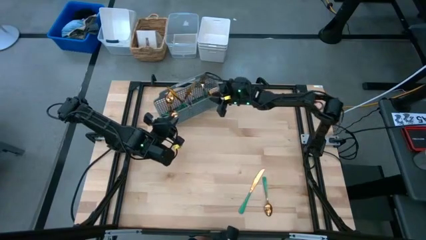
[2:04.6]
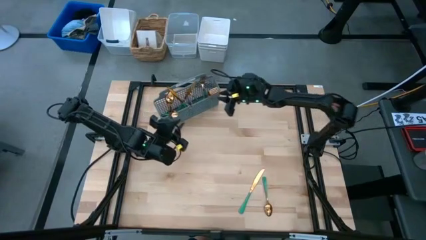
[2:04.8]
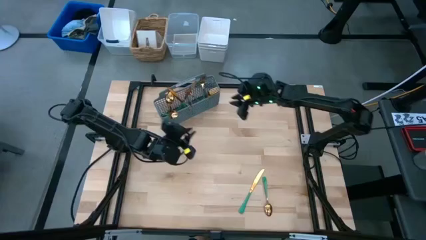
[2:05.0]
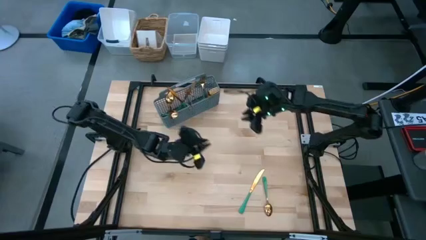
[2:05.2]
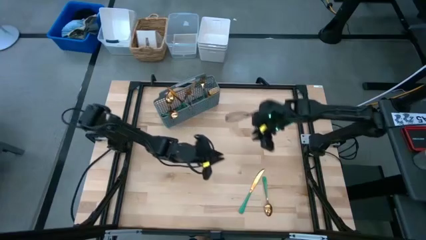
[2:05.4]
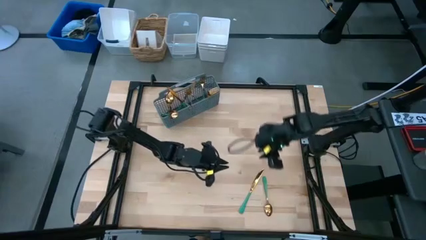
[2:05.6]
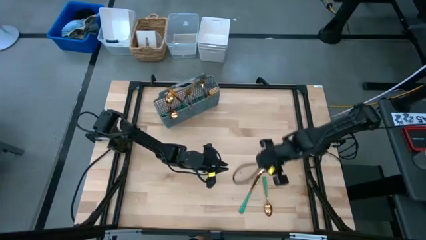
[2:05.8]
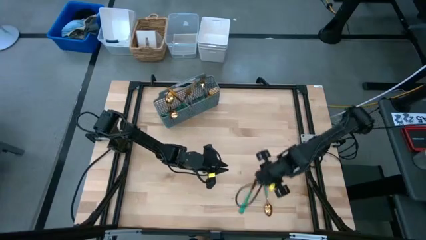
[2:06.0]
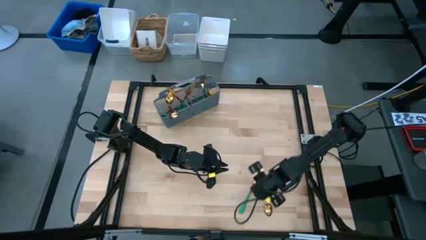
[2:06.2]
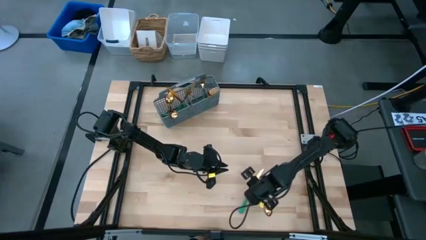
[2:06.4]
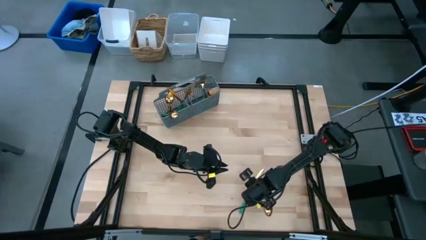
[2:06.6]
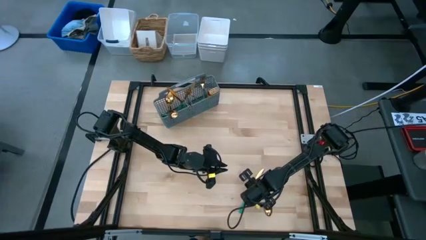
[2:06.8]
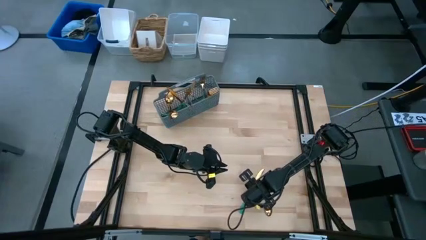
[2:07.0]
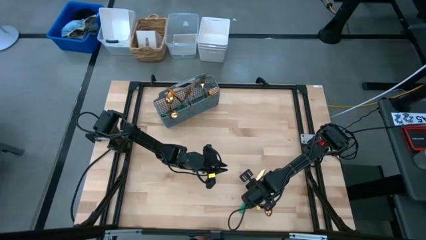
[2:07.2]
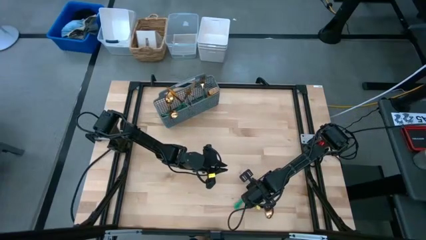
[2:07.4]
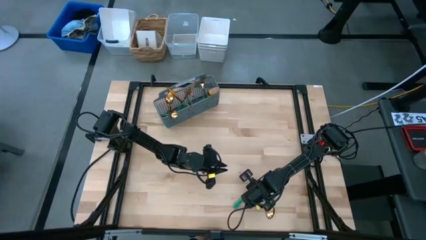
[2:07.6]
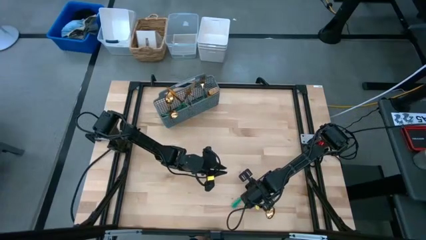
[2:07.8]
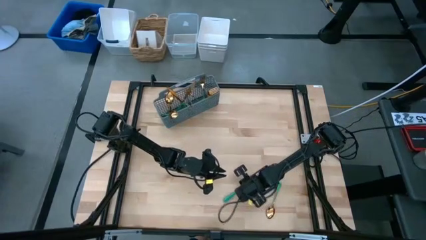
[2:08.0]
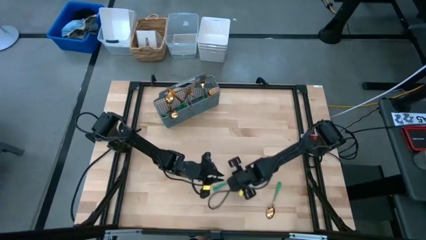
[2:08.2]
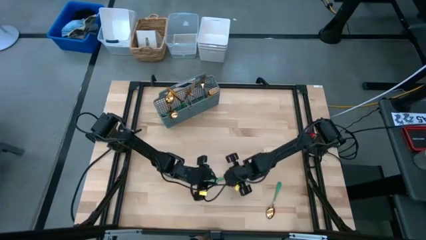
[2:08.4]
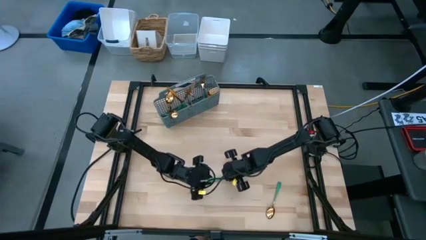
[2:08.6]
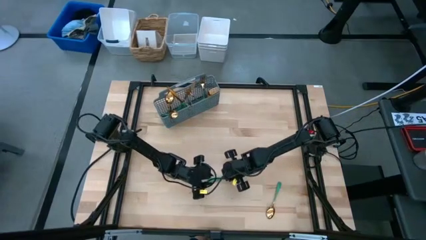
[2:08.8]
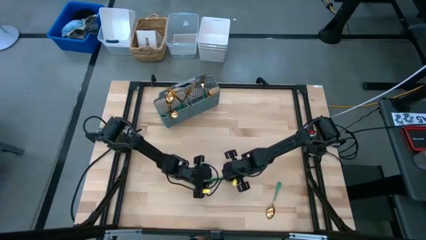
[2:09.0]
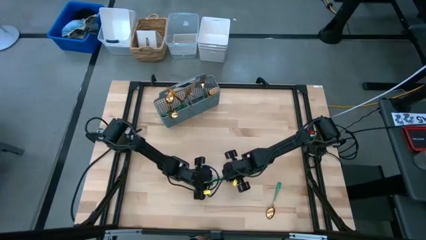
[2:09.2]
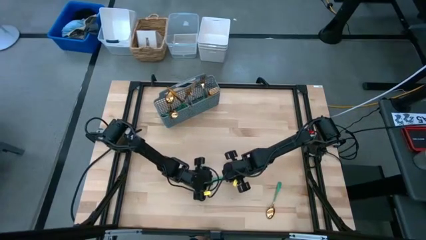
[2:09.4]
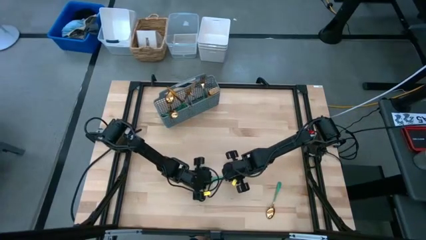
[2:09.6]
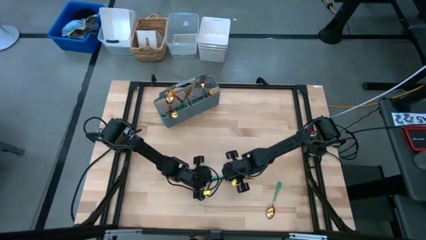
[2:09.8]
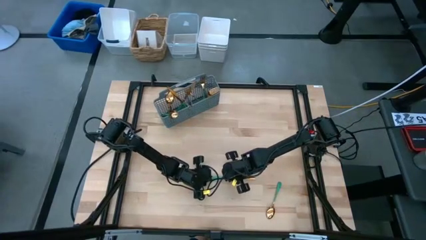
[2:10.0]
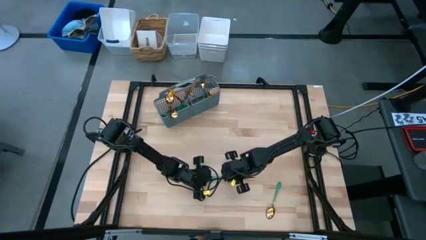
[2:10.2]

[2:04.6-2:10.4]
Task: Sort silverware
Put the knife into the middle left section of the silverware holder

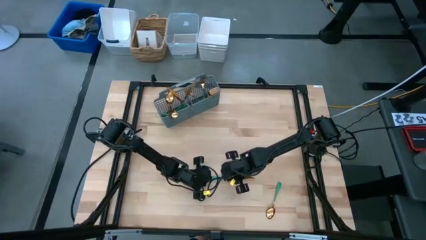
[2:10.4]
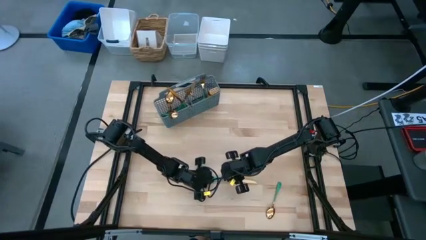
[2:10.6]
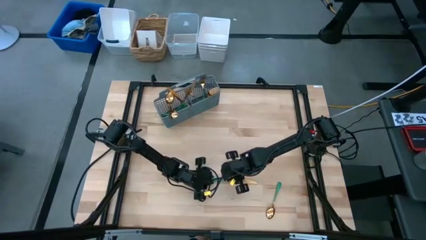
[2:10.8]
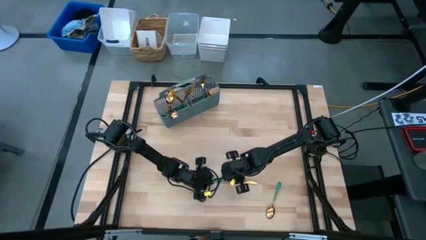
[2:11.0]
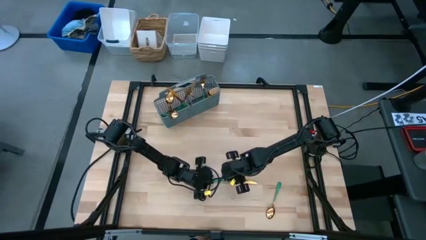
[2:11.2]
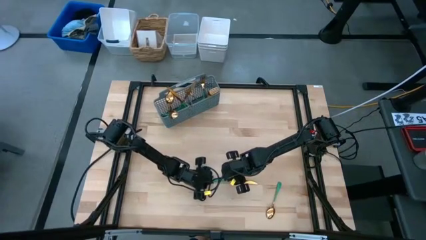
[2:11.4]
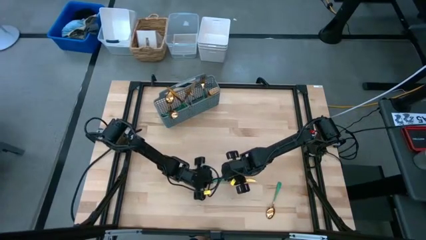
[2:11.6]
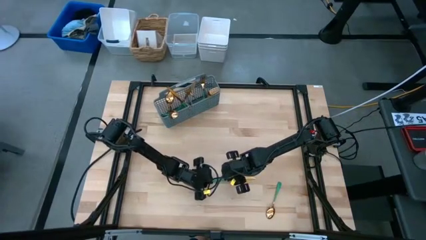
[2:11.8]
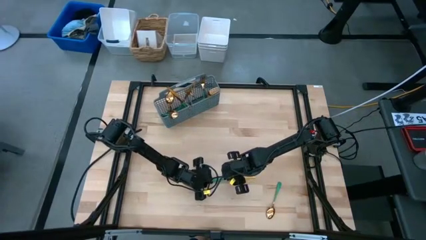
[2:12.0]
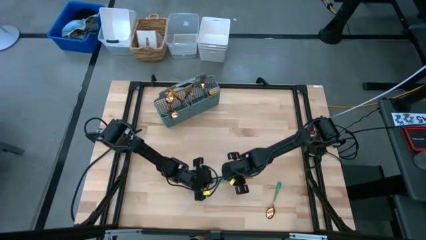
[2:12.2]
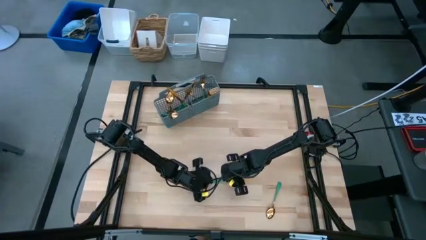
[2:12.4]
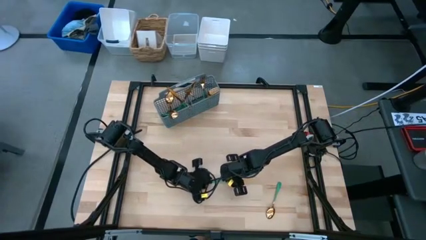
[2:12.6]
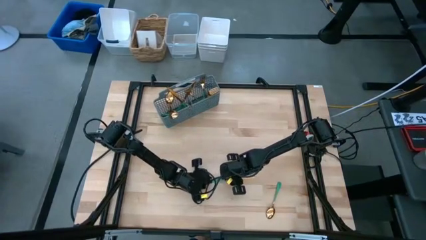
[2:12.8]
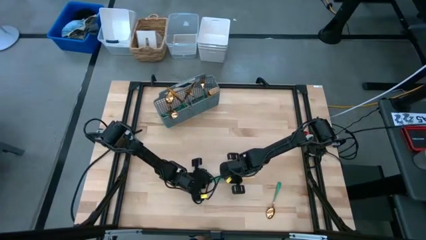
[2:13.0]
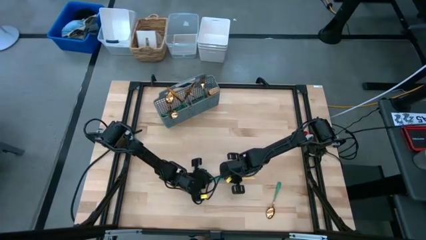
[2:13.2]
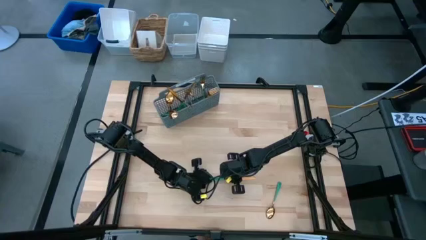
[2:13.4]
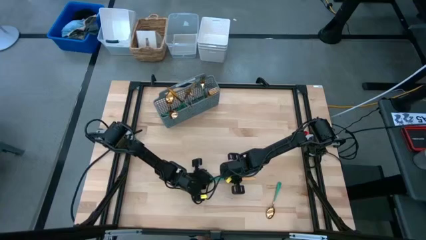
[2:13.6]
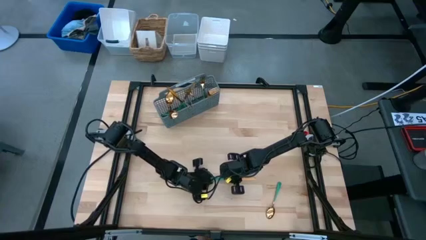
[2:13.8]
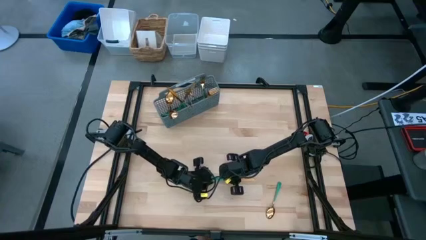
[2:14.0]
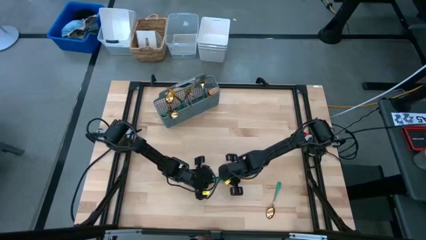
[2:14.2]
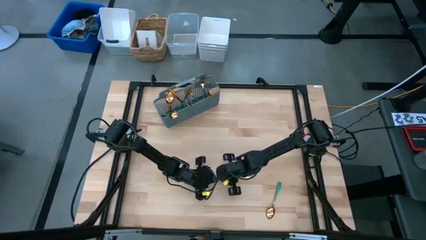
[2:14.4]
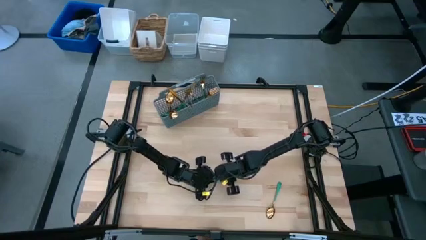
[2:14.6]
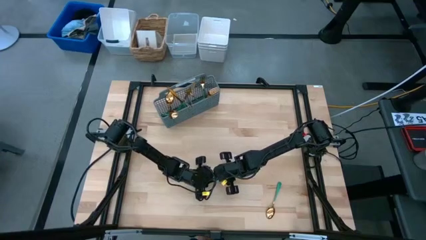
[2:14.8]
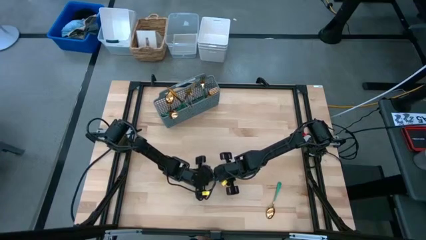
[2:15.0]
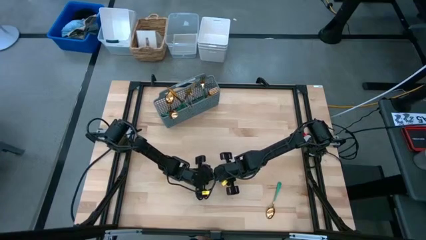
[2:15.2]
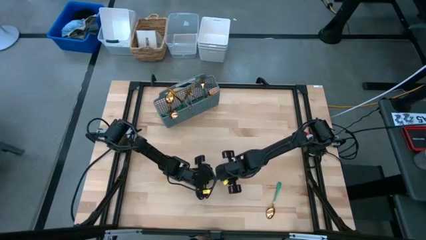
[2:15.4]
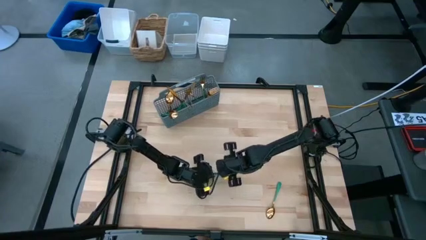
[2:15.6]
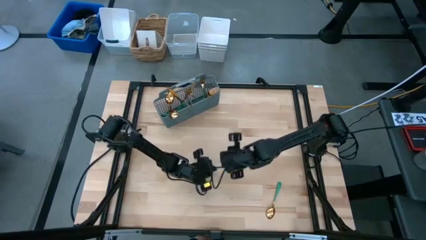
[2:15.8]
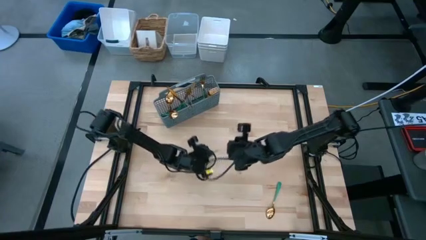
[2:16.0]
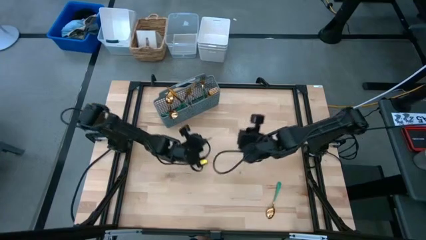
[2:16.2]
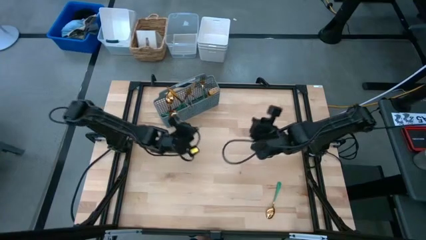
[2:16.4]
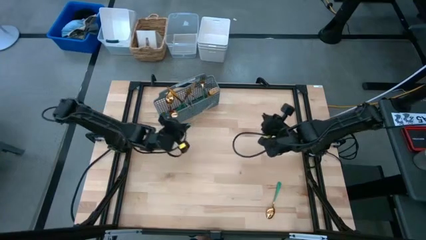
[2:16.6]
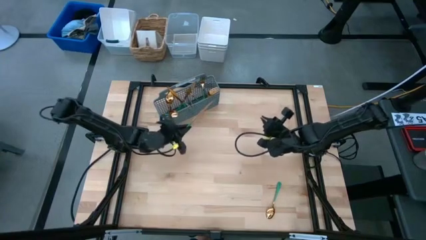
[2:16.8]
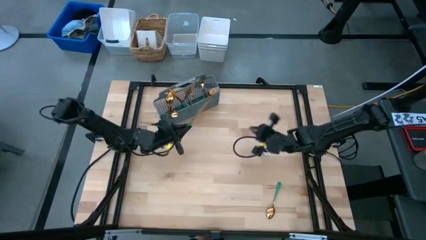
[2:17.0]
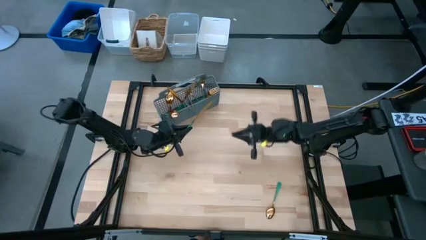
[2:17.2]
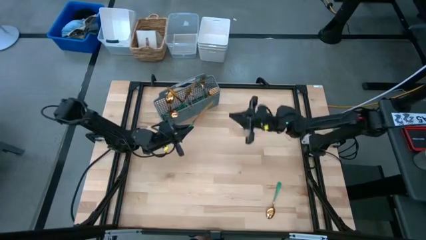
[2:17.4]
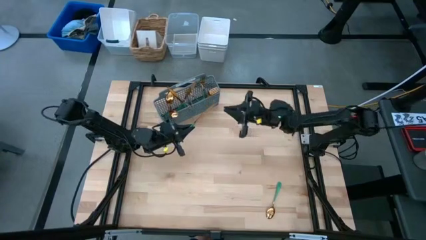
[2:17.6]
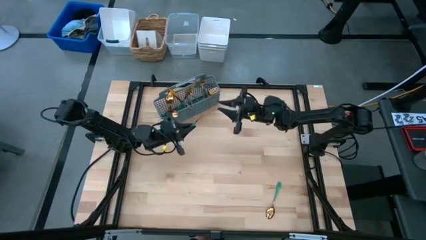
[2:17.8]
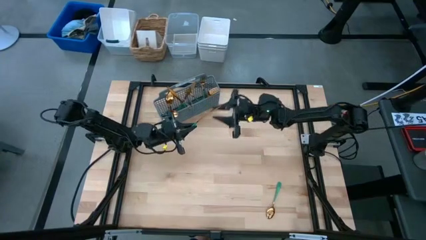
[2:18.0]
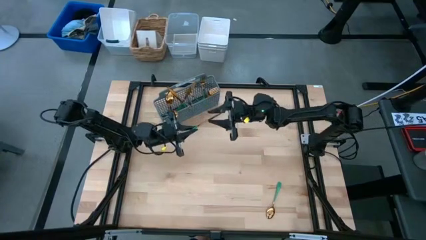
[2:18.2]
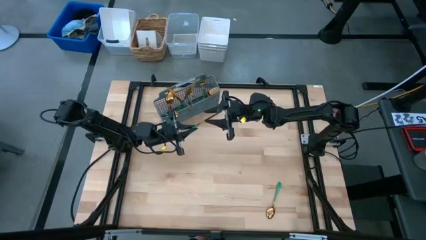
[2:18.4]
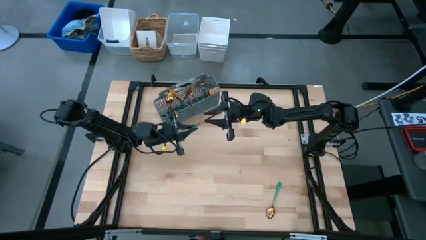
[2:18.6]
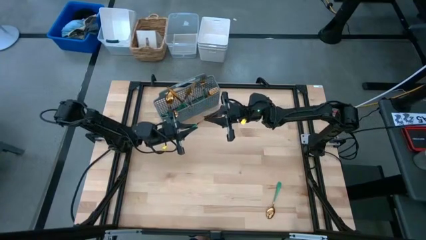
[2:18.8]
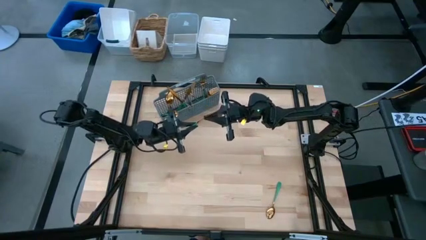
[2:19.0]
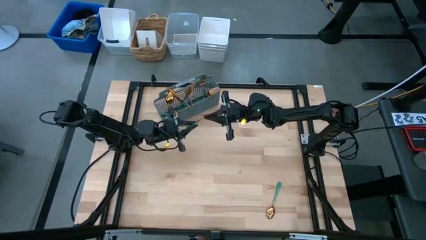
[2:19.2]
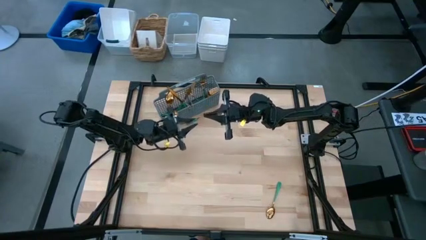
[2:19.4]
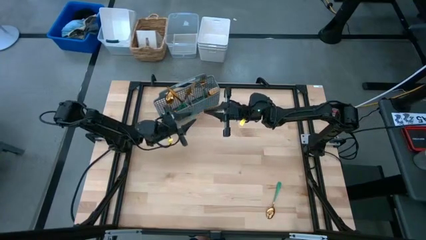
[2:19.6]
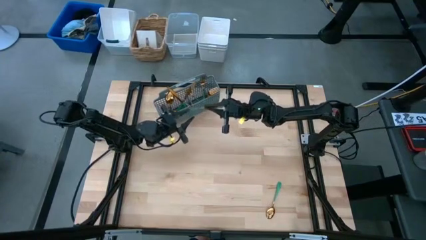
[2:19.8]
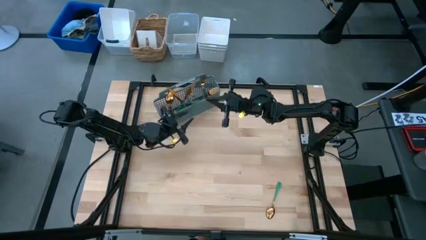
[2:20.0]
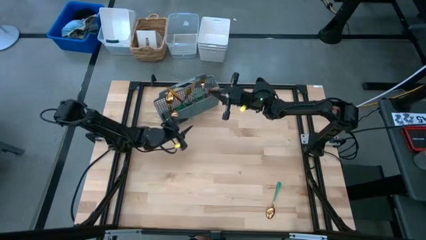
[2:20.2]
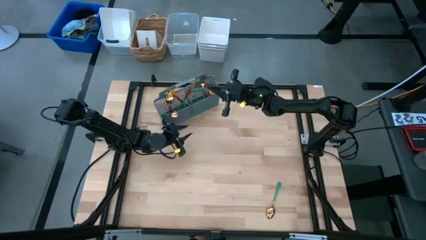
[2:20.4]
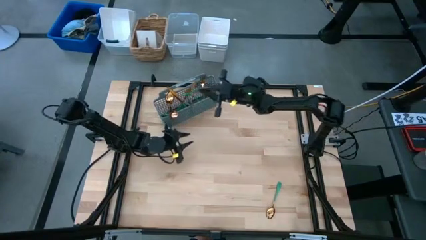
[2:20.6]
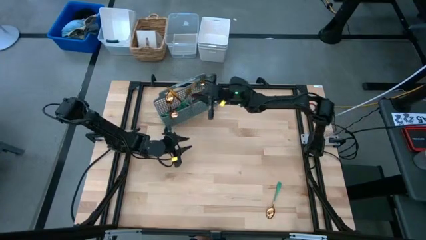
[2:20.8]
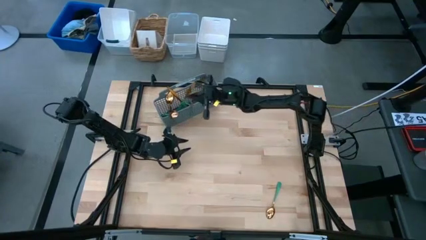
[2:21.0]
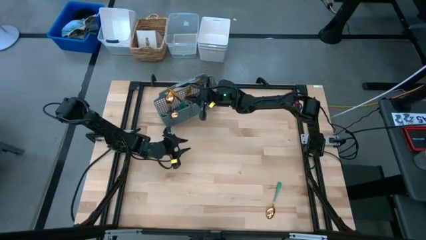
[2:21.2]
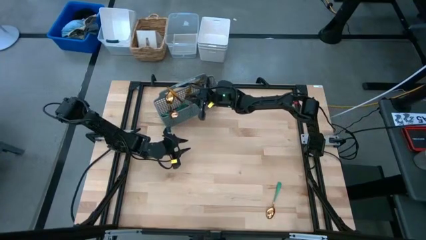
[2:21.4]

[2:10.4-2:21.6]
Put the knife into the middle left section of the silverware holder
